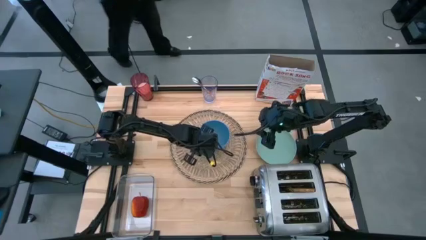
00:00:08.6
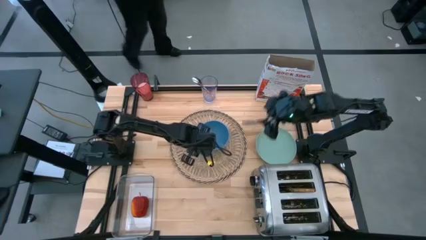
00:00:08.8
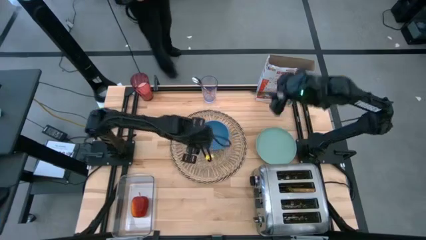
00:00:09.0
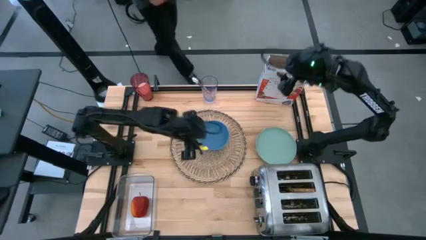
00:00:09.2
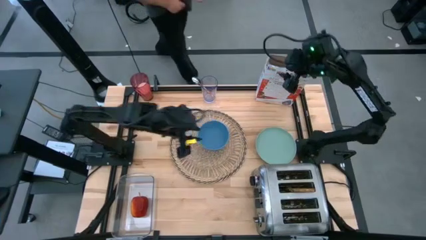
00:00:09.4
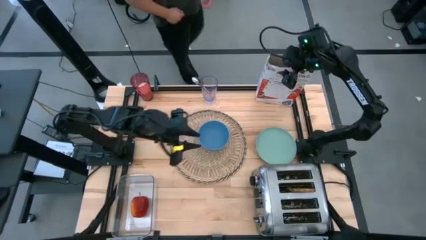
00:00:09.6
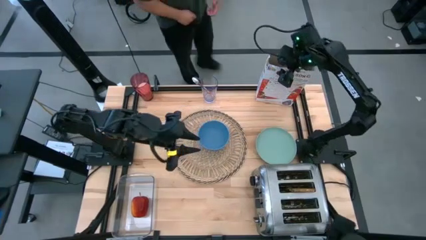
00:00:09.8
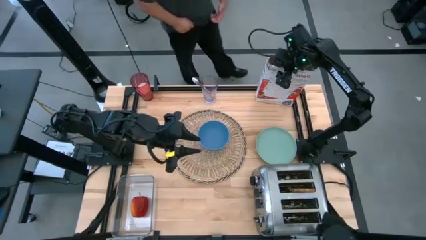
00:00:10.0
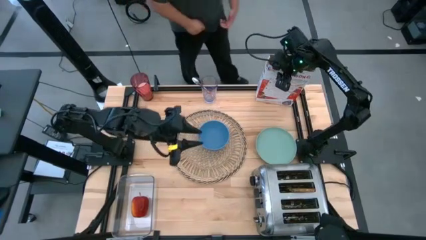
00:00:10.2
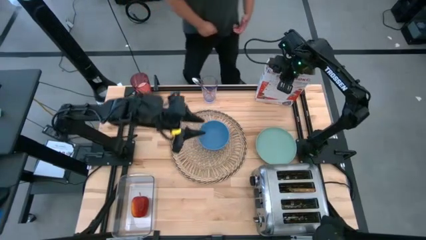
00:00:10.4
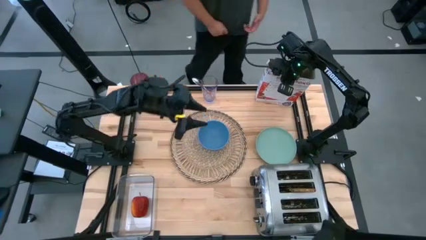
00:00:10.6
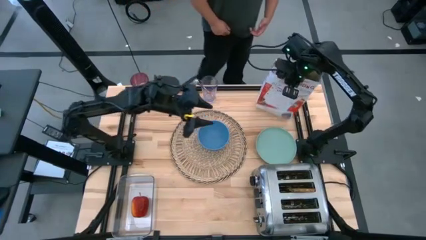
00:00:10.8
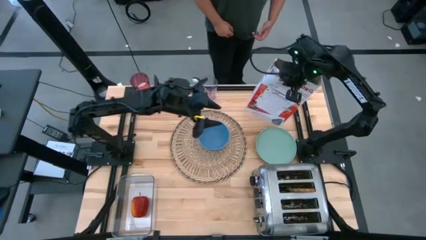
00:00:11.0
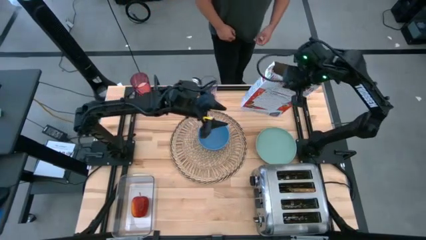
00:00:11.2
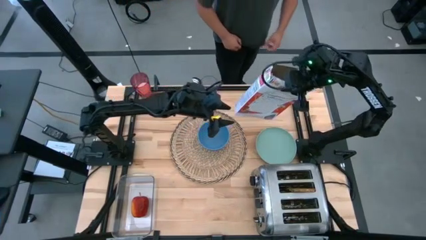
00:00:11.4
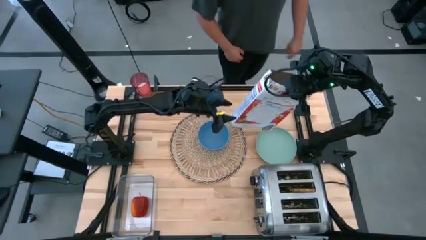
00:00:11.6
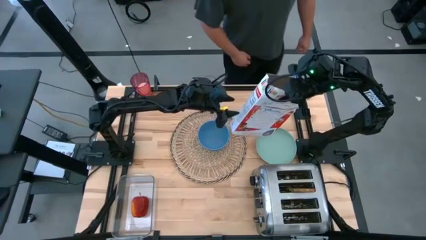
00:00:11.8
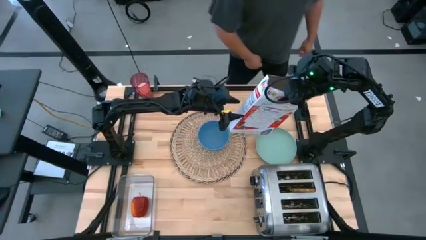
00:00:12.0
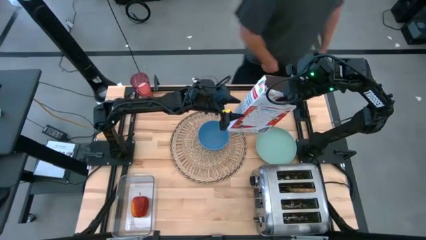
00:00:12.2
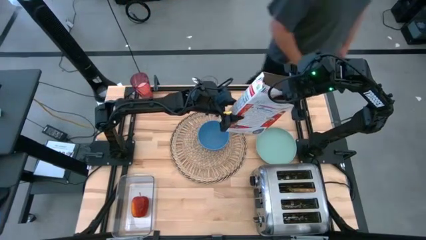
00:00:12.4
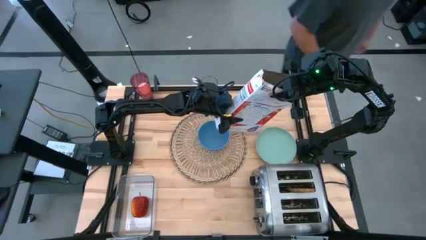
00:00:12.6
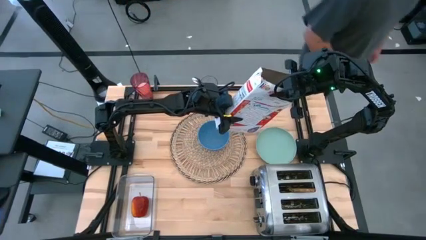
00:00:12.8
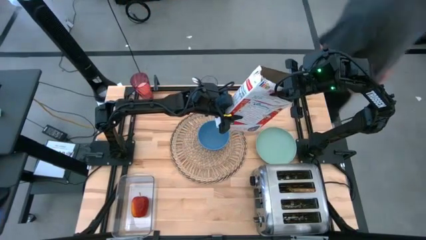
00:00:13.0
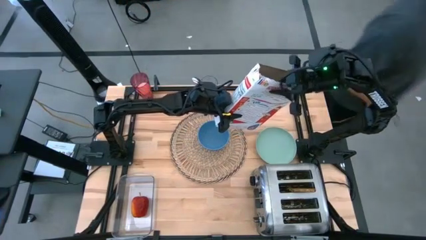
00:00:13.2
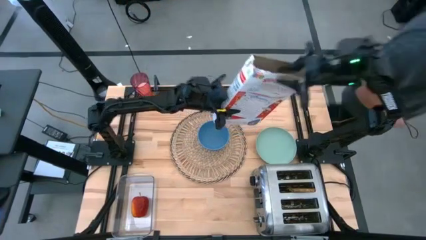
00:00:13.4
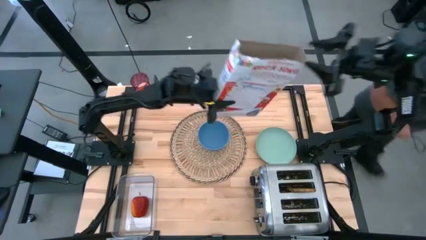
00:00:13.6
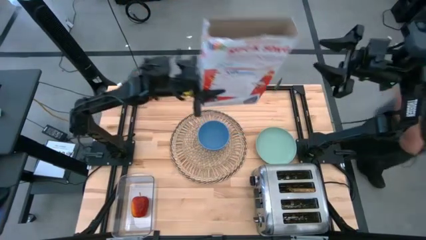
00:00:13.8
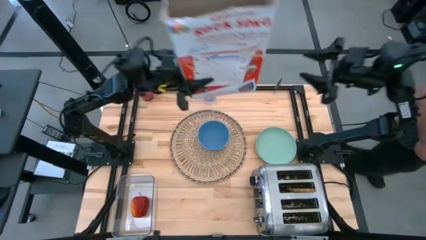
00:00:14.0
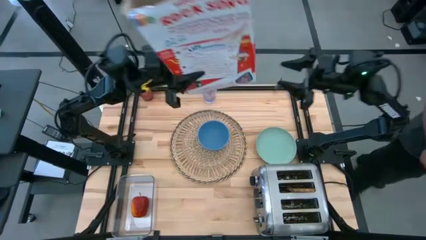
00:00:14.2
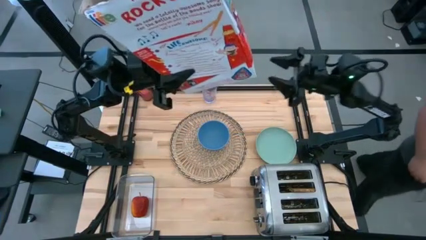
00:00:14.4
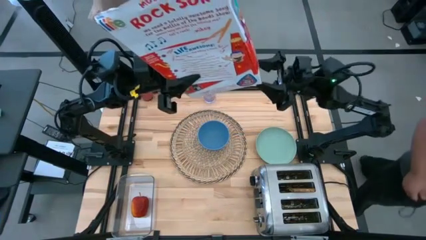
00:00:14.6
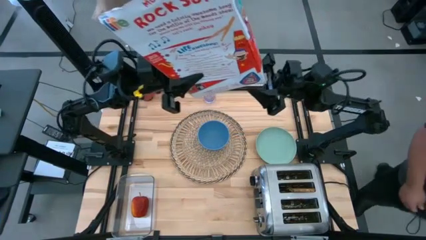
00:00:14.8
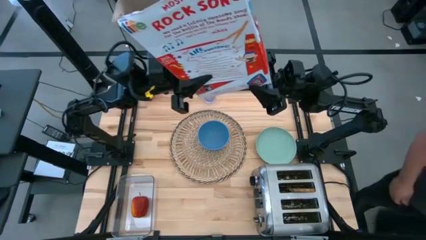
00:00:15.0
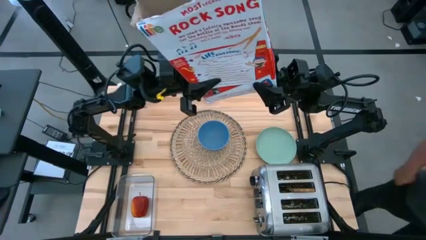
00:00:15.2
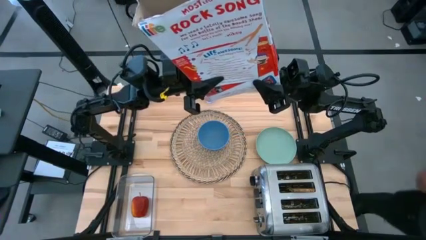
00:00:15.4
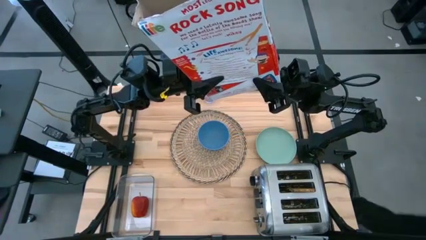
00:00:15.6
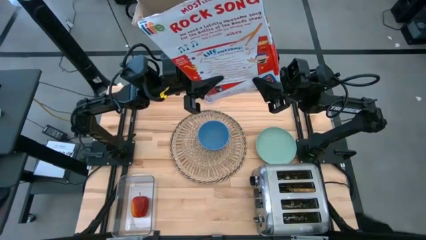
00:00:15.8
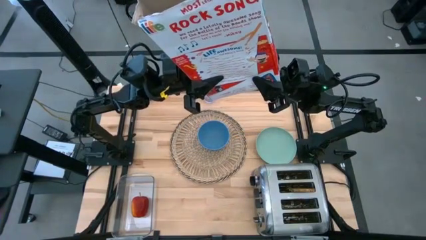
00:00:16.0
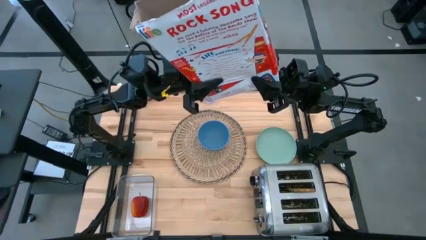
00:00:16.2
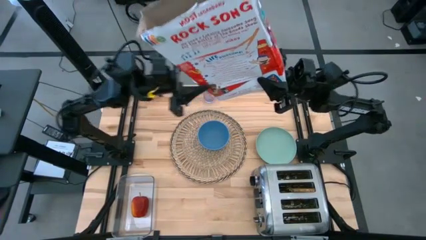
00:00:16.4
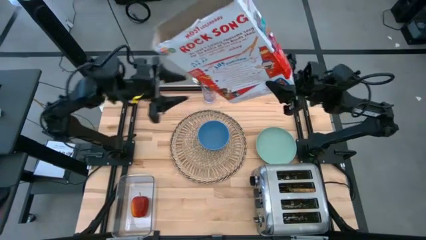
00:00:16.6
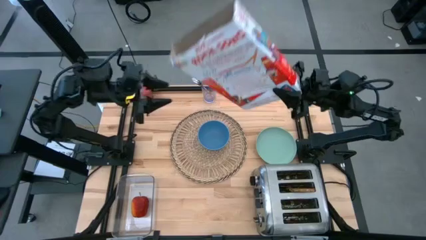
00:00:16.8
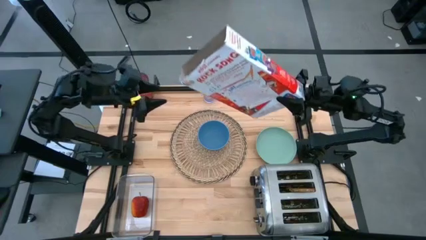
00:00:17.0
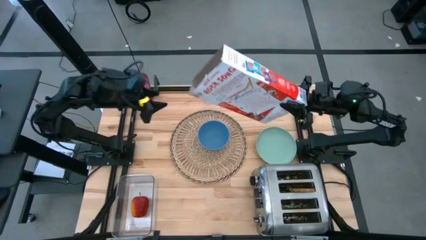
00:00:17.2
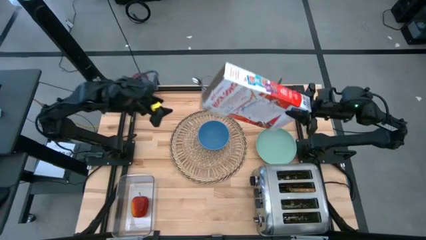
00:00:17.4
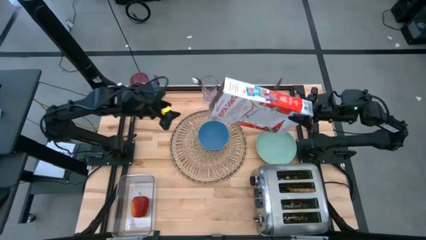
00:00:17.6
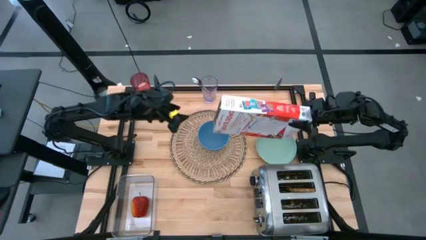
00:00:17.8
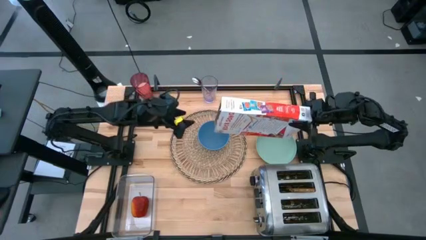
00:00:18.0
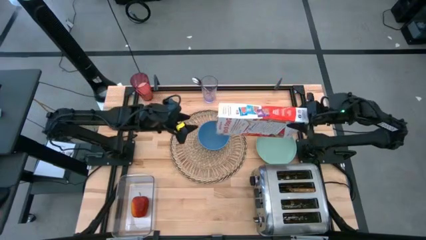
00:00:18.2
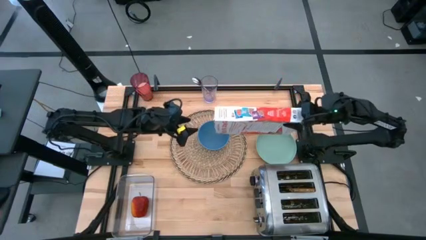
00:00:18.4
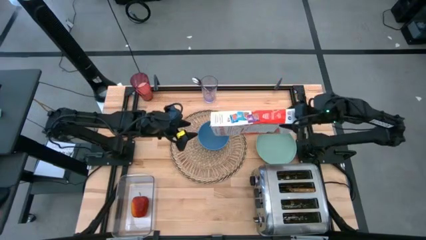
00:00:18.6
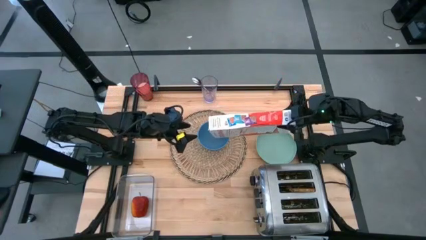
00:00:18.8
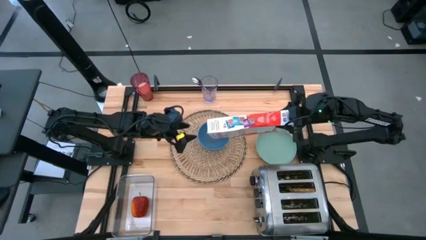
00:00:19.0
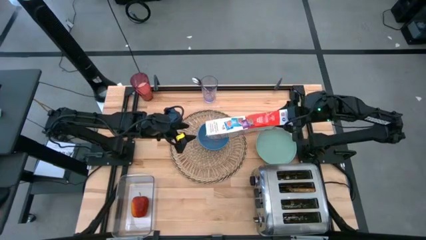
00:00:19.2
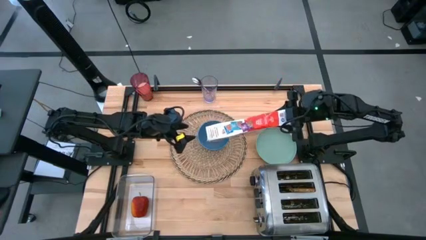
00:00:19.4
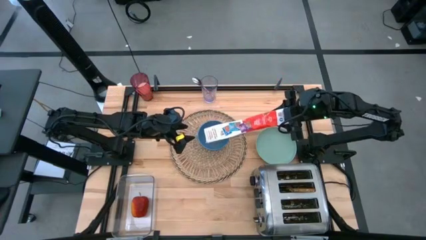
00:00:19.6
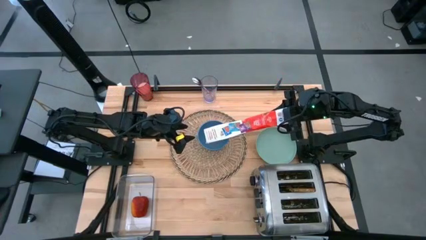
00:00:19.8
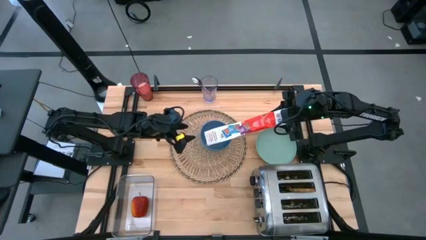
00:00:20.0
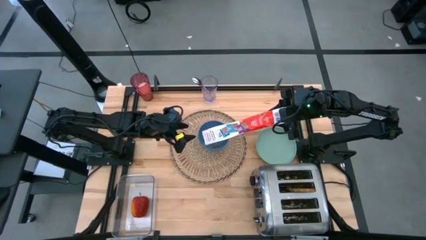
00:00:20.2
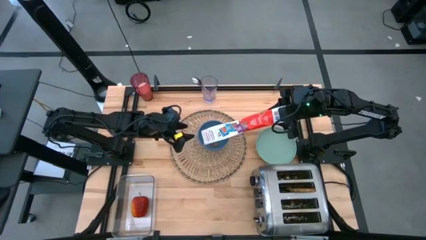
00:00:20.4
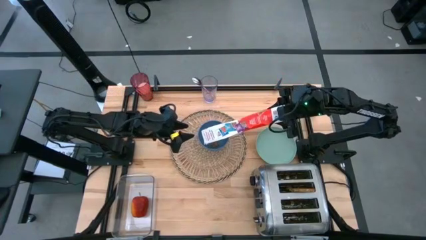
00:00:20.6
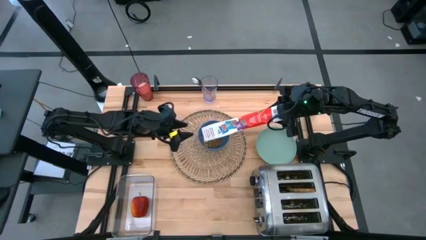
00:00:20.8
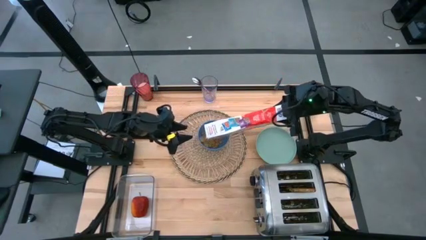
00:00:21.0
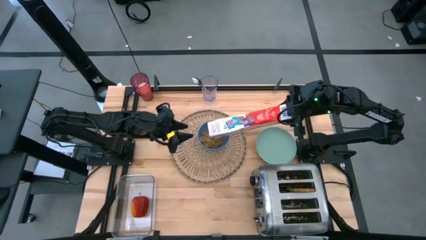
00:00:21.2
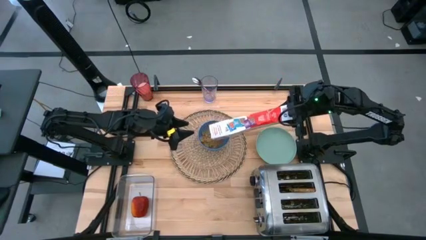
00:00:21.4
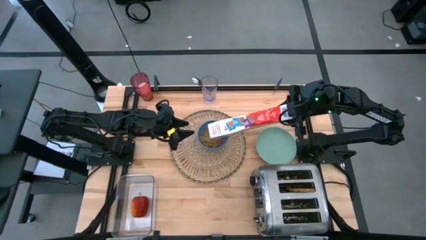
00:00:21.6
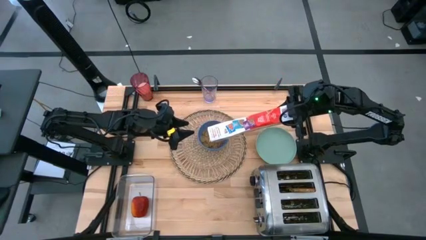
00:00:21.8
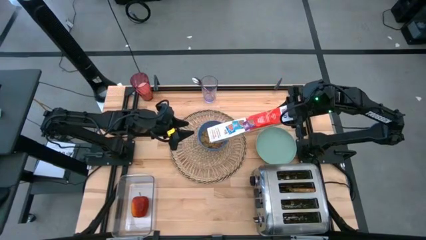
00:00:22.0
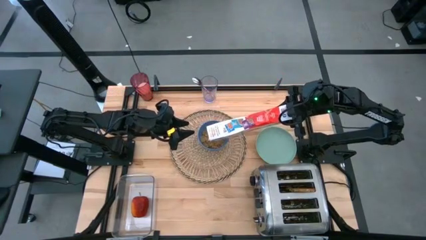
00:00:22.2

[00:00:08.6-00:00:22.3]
Task: Arrange a breakfast setting
Pour the cereal from the white cereal box into the blue bowl

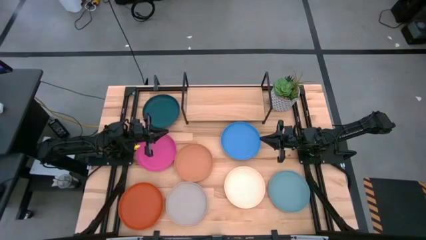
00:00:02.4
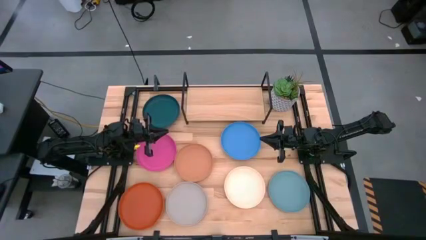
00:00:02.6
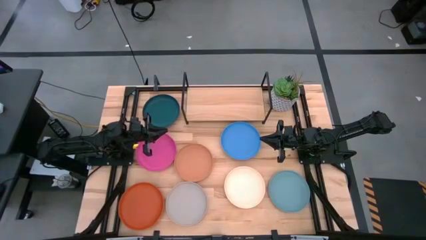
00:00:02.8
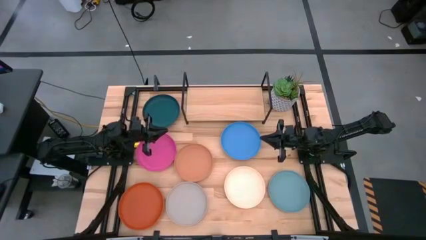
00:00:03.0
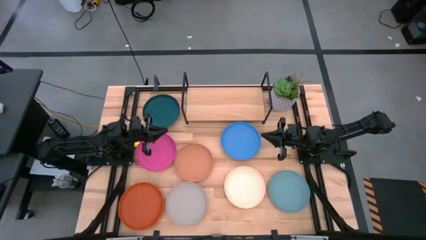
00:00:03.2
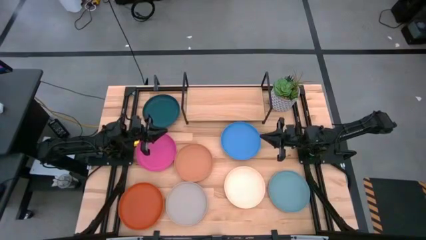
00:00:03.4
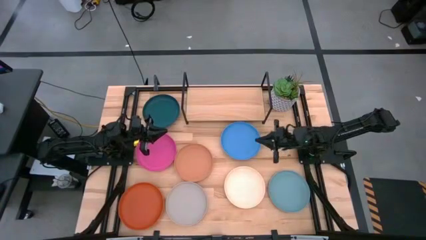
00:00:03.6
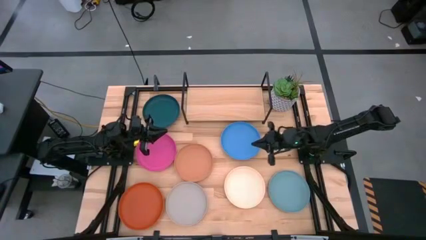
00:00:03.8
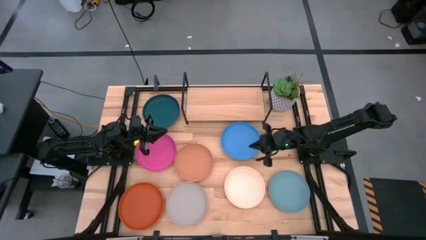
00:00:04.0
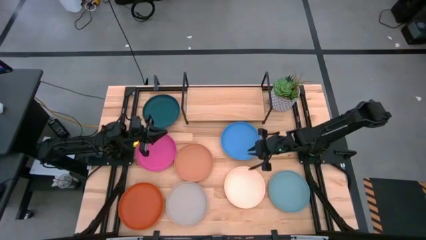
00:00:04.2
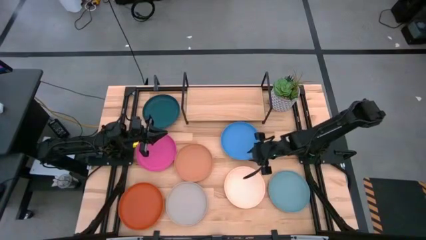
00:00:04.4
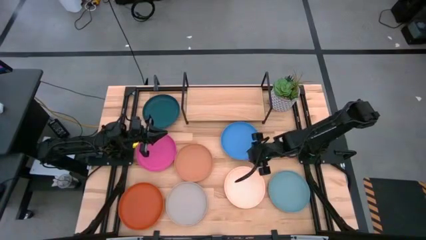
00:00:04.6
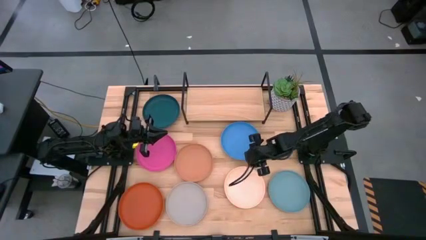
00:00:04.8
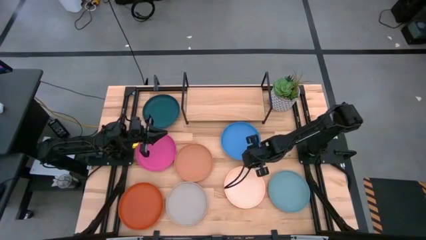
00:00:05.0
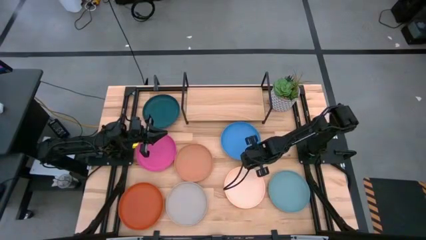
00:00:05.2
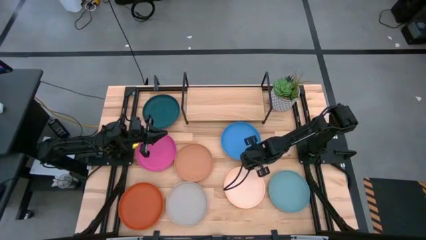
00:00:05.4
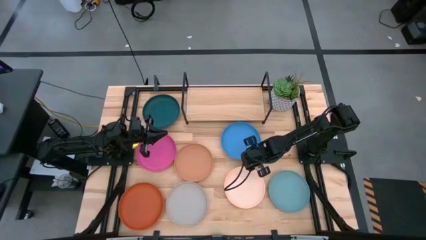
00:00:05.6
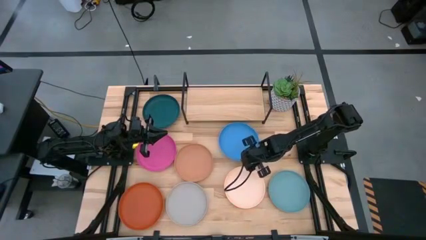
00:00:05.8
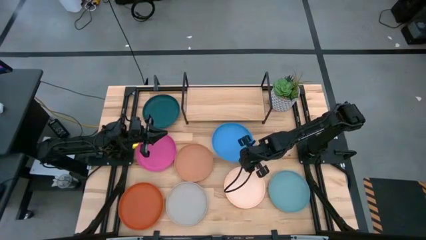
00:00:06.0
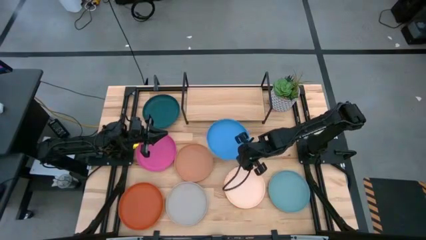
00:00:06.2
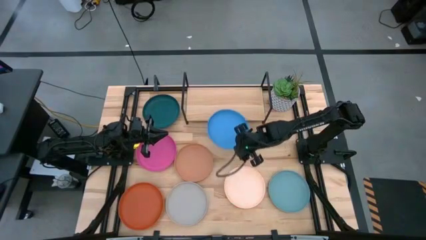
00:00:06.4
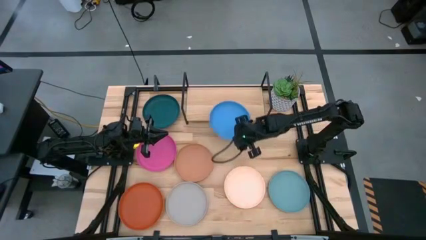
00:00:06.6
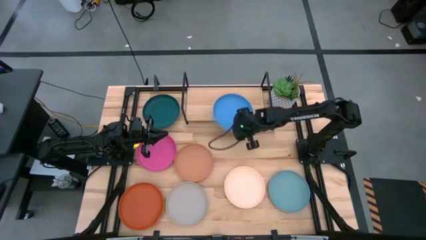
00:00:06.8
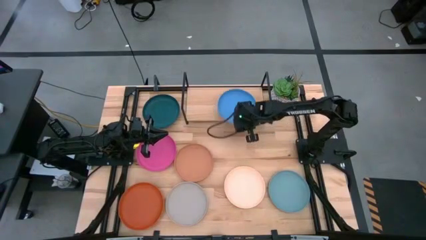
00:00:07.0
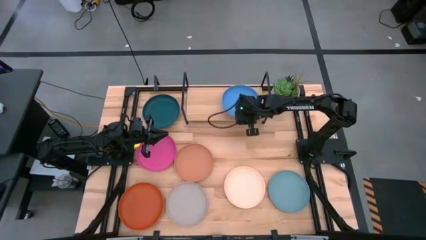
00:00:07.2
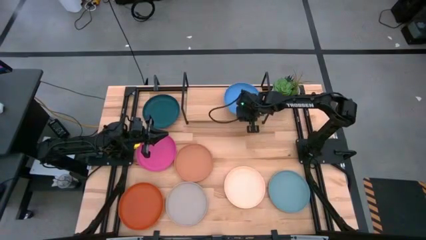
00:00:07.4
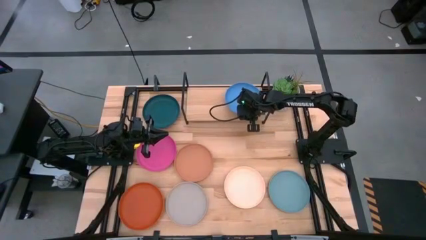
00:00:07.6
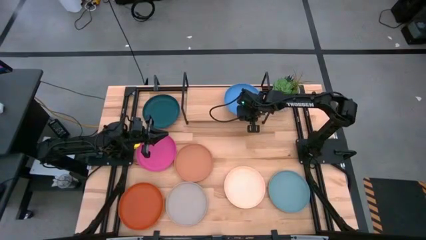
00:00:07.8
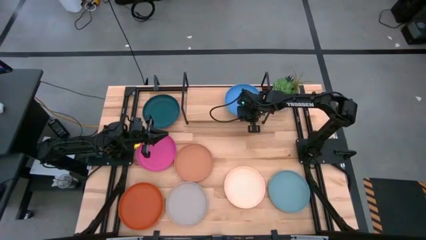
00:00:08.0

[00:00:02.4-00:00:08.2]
Task: Place and stack plates onto a shelf
Put the blue plate on the shelf
